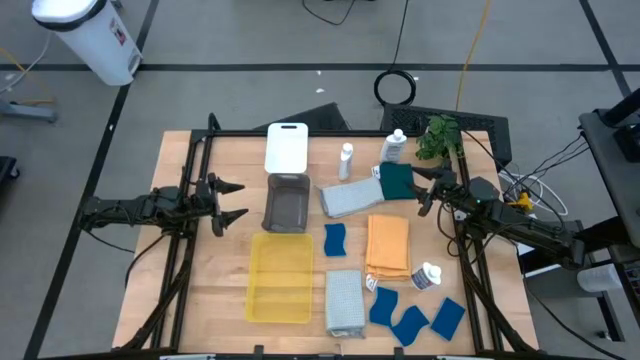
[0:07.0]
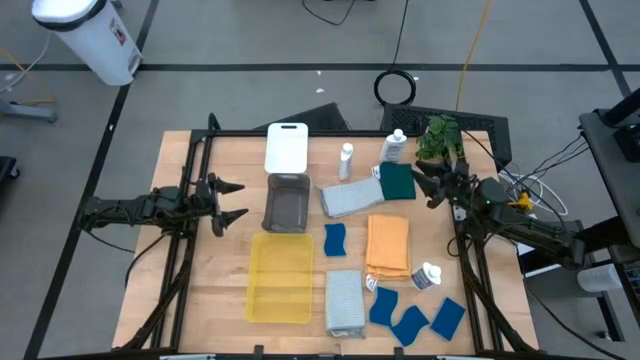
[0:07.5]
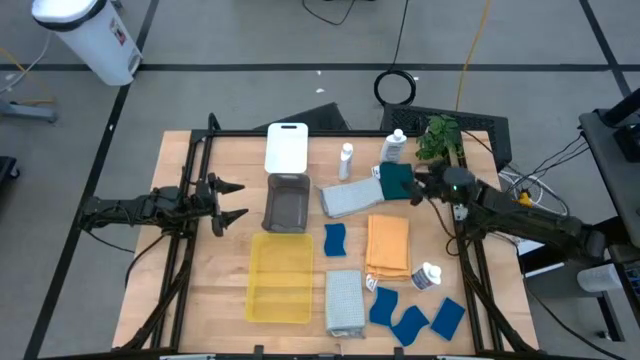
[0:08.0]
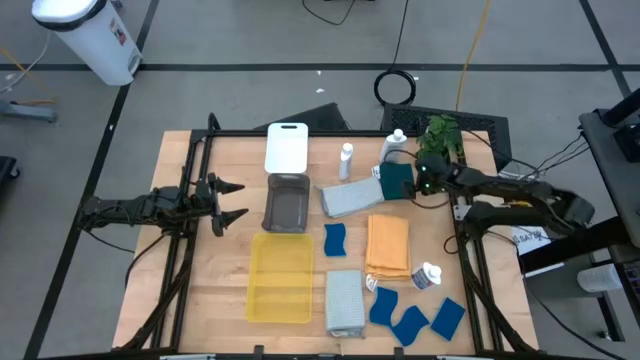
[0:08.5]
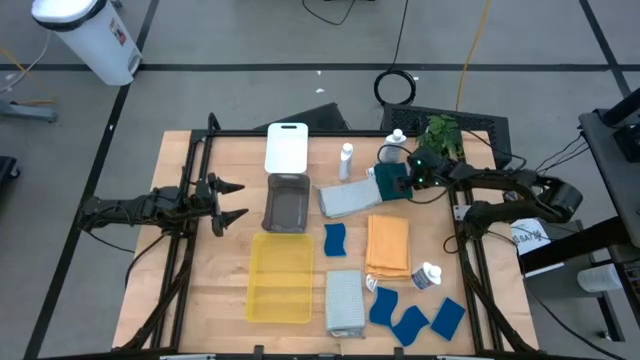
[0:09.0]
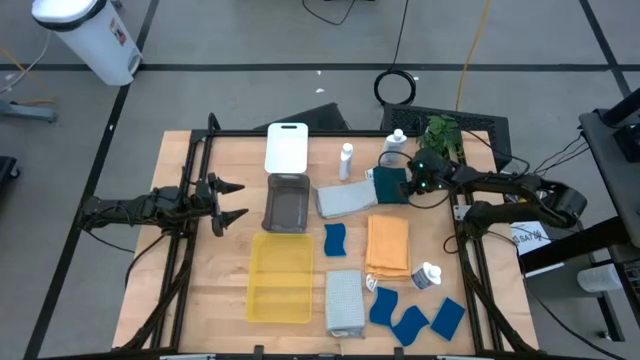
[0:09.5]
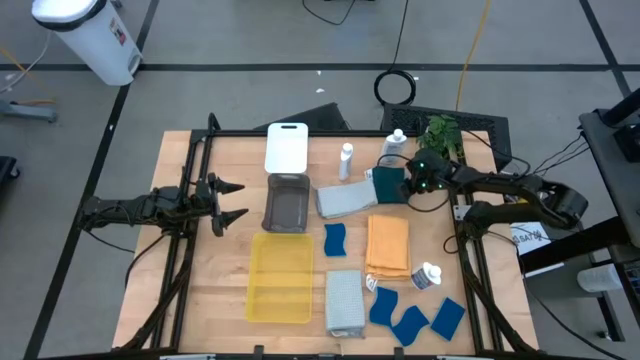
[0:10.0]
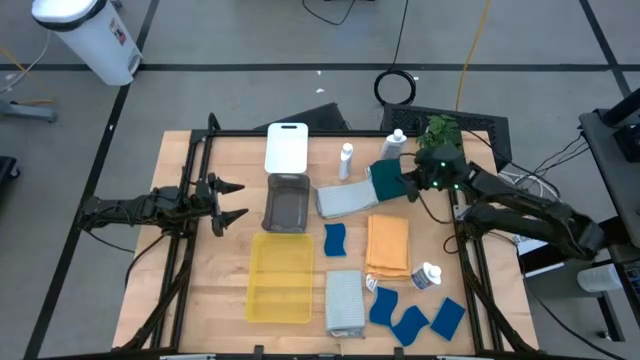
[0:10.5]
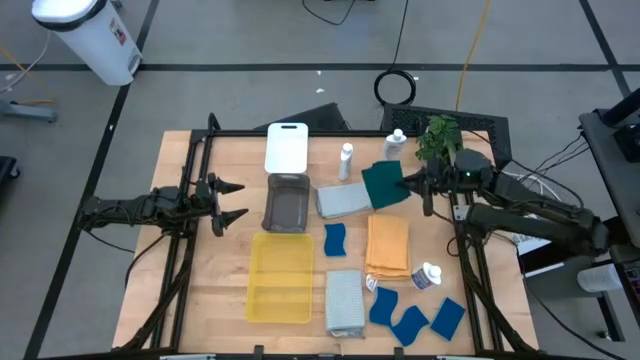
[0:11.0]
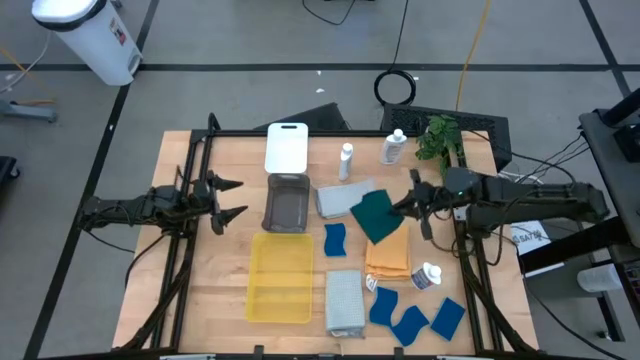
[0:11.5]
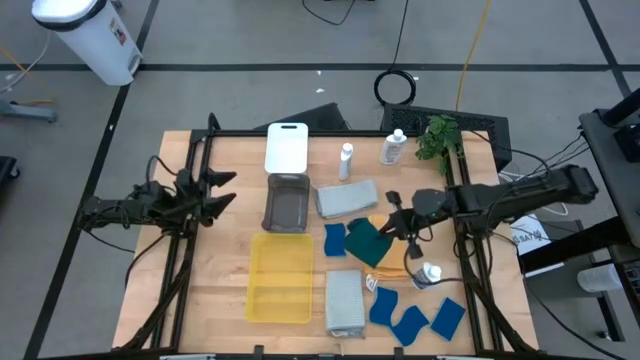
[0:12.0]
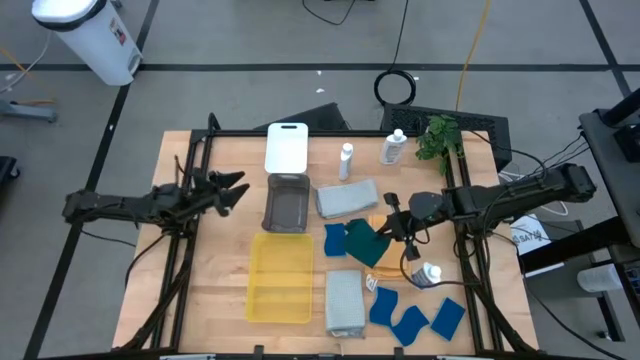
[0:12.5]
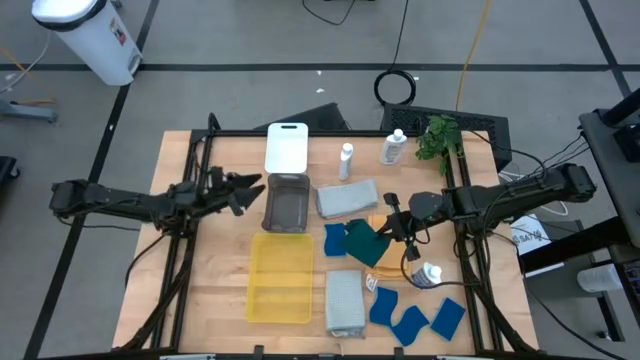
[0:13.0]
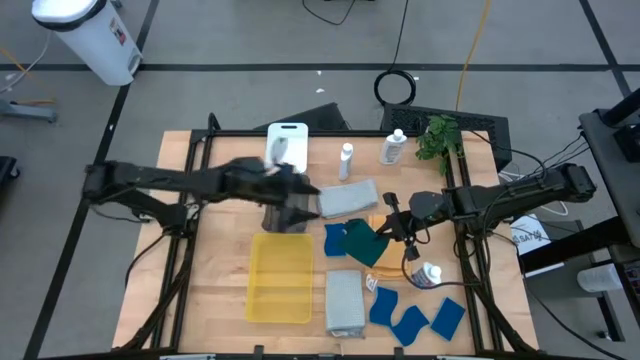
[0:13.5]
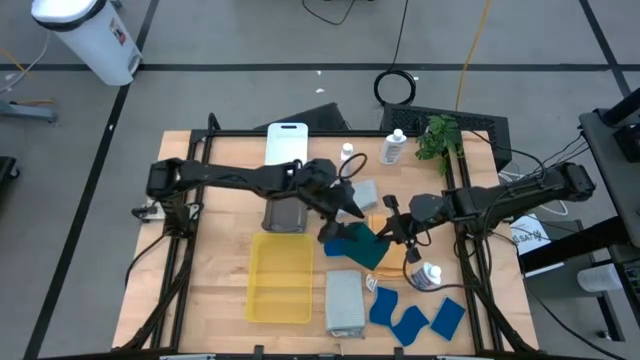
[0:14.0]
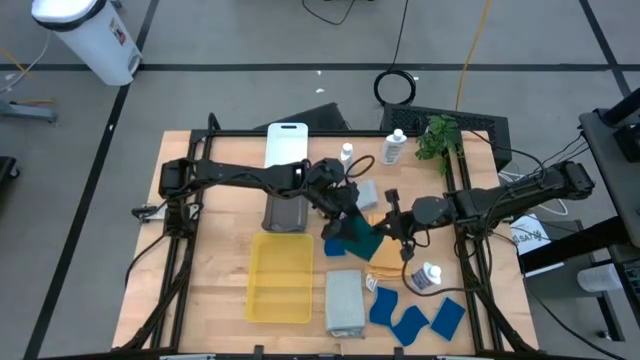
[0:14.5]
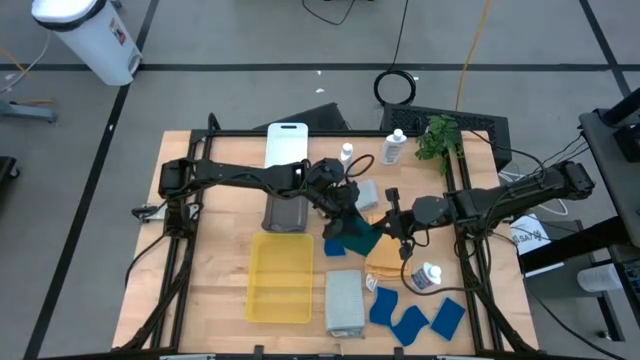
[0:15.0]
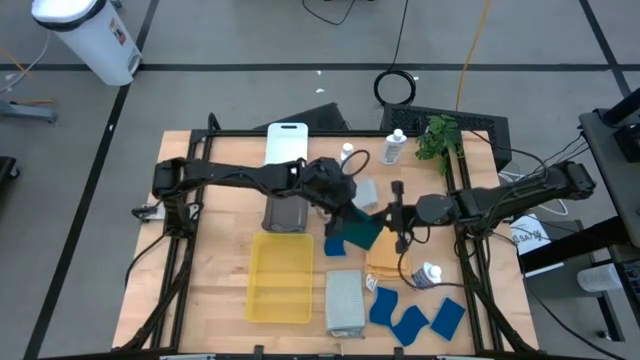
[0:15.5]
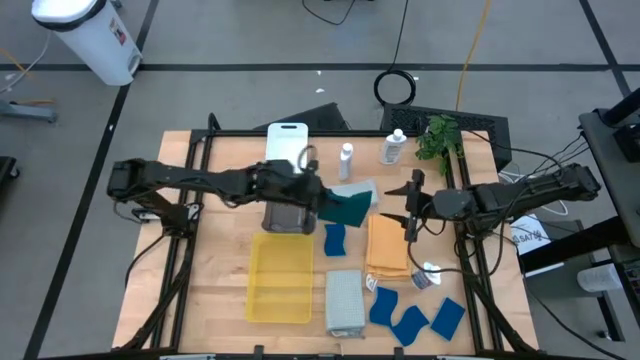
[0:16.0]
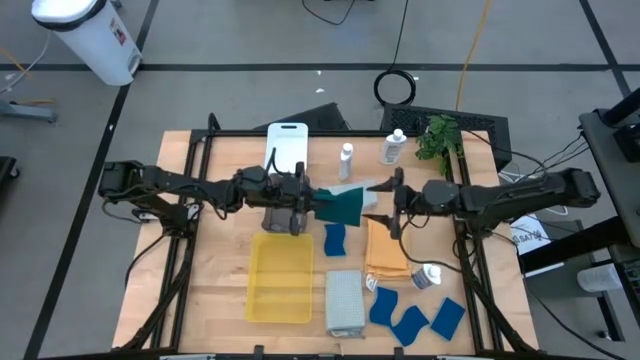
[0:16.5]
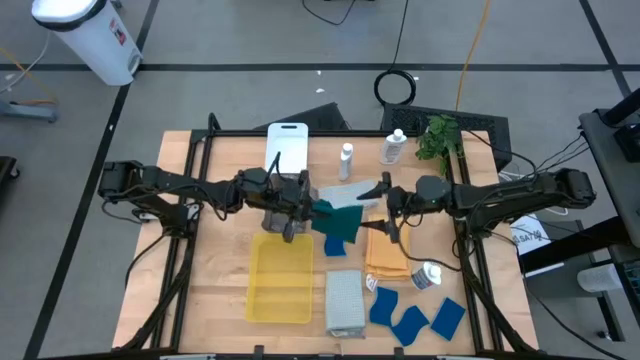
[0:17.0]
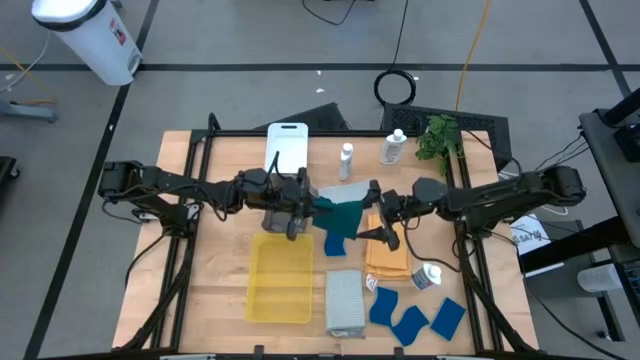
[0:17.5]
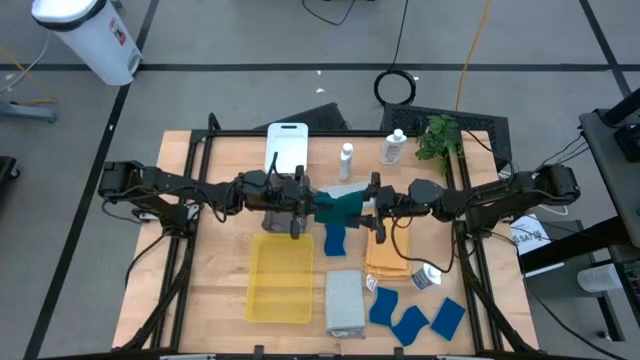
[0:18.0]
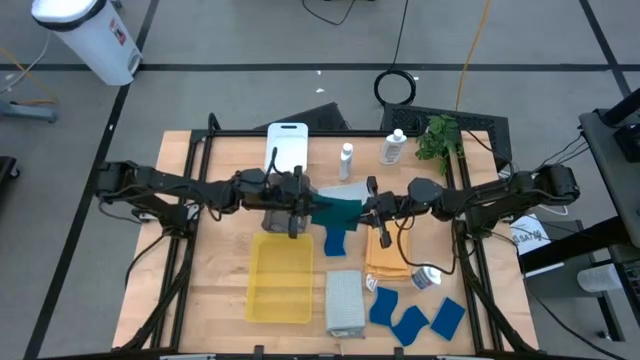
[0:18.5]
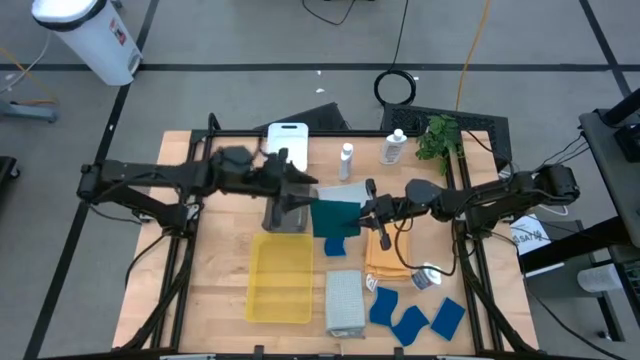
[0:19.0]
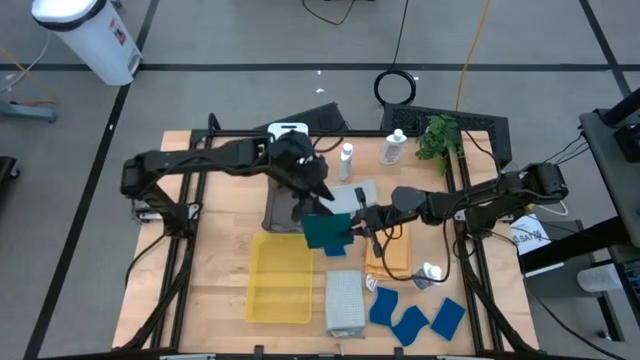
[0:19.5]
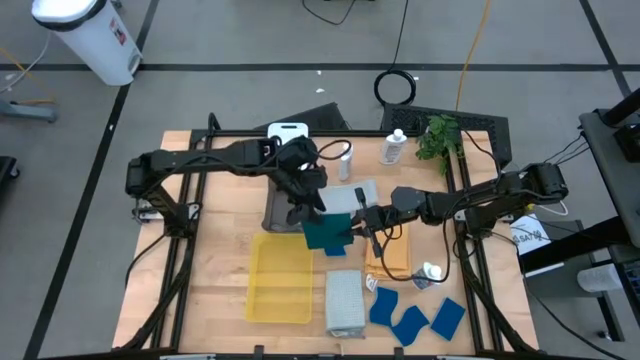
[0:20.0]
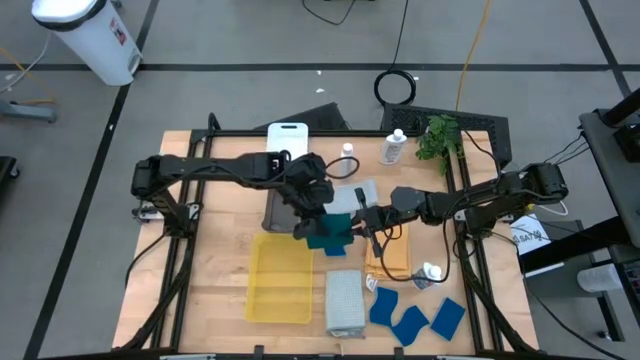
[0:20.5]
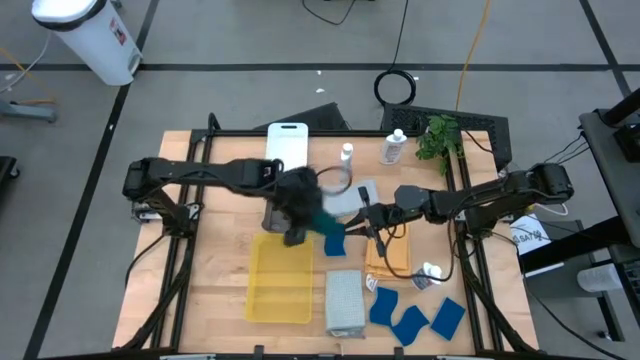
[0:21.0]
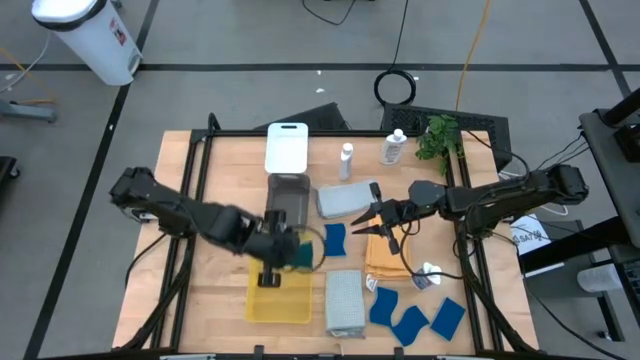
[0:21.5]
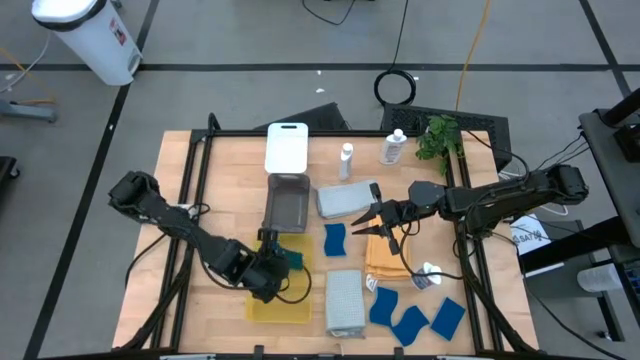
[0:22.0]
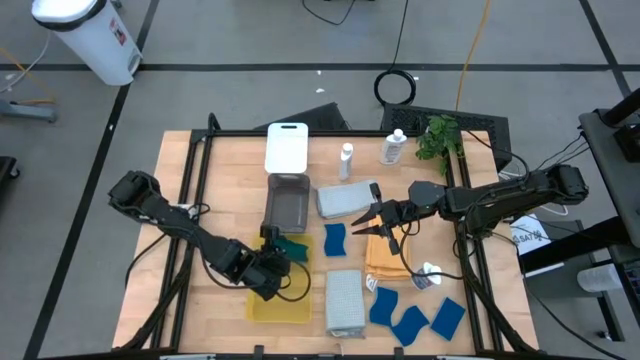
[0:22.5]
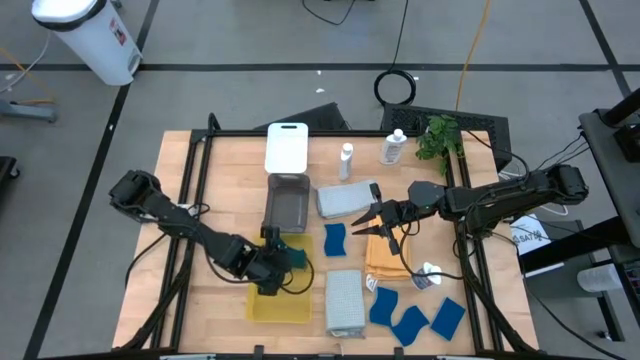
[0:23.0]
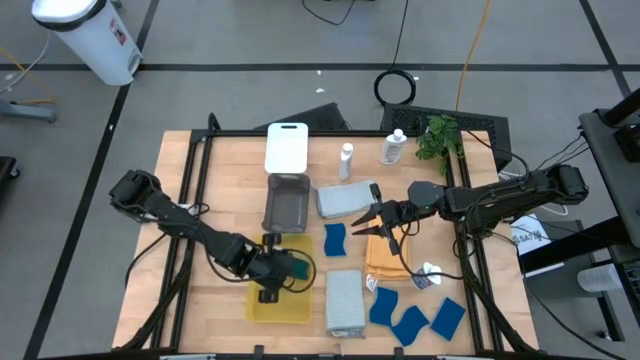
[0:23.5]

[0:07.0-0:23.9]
Task: Pick & Place Kitchen Items
Put the green towel into the yellow bin

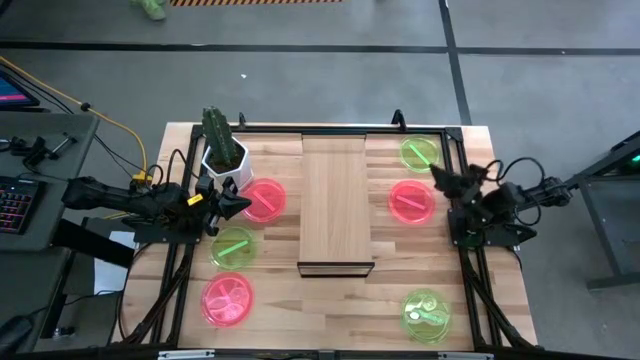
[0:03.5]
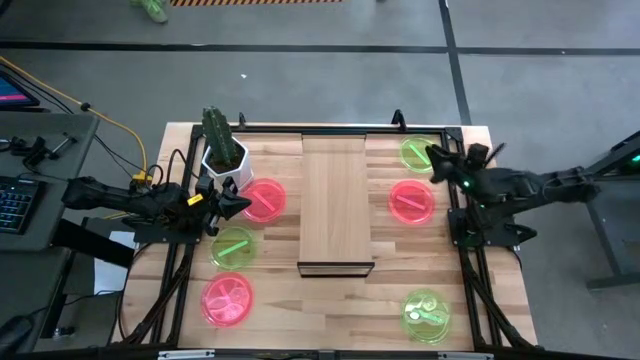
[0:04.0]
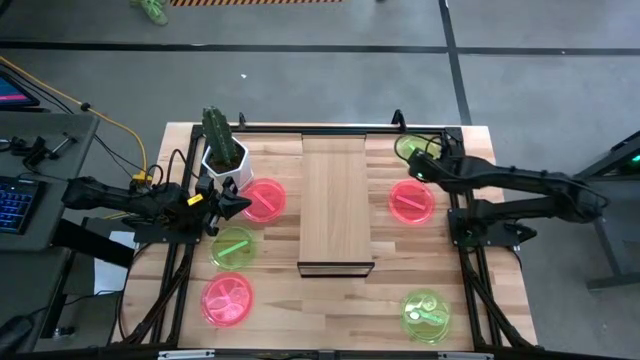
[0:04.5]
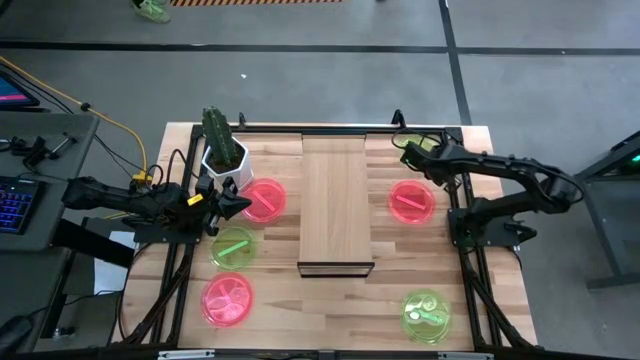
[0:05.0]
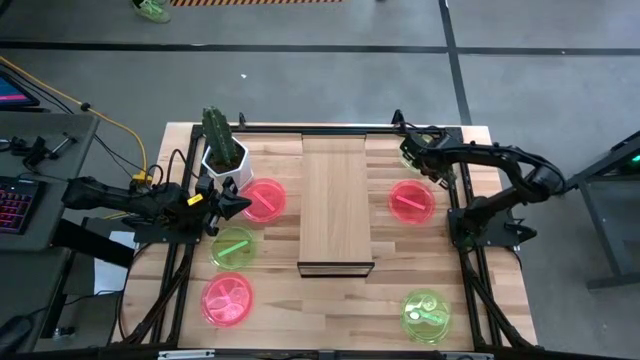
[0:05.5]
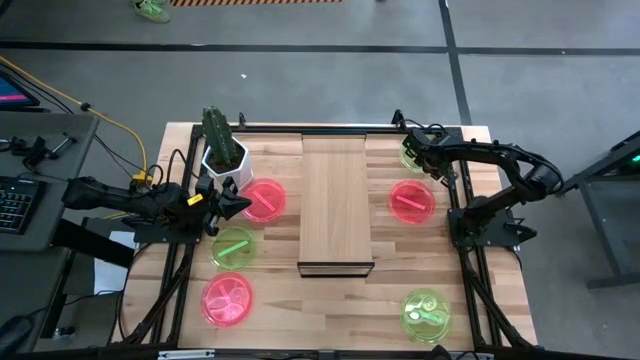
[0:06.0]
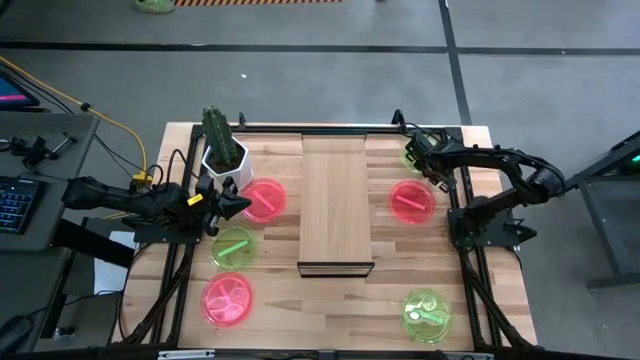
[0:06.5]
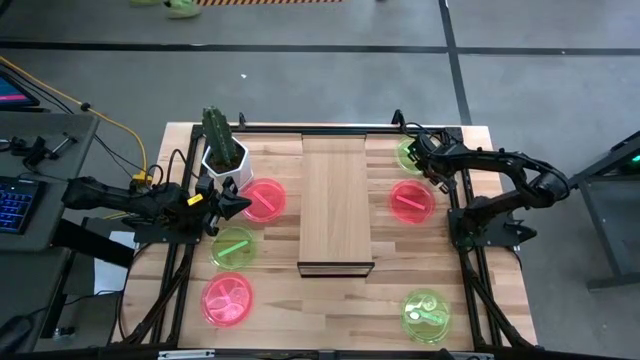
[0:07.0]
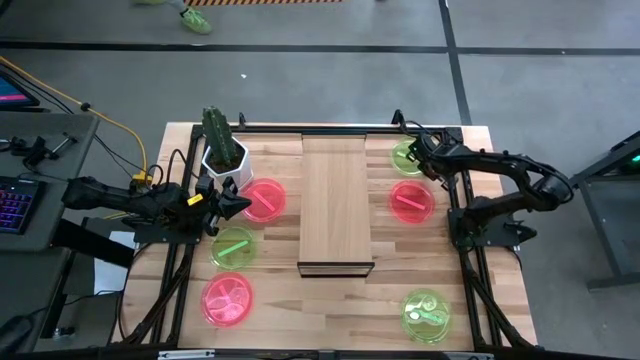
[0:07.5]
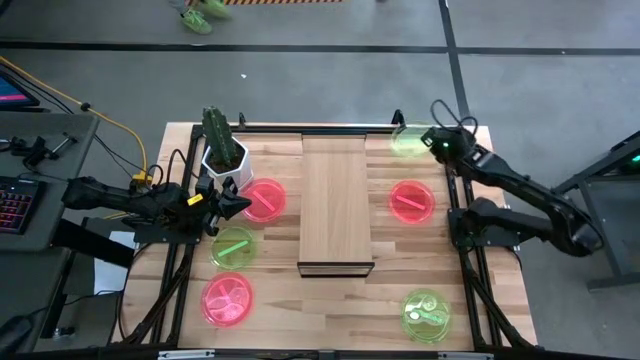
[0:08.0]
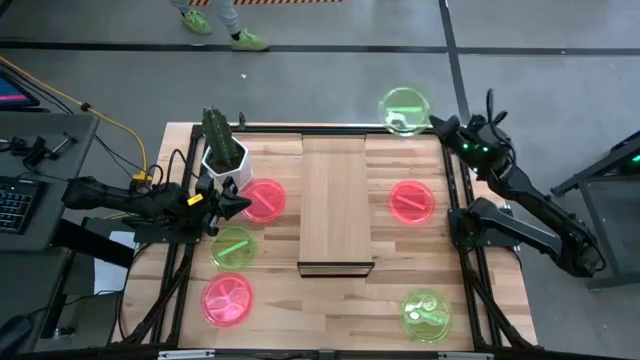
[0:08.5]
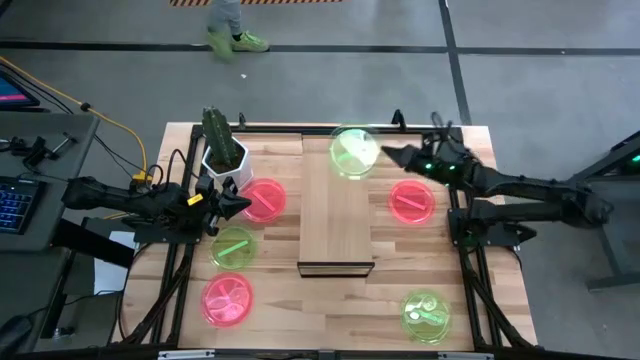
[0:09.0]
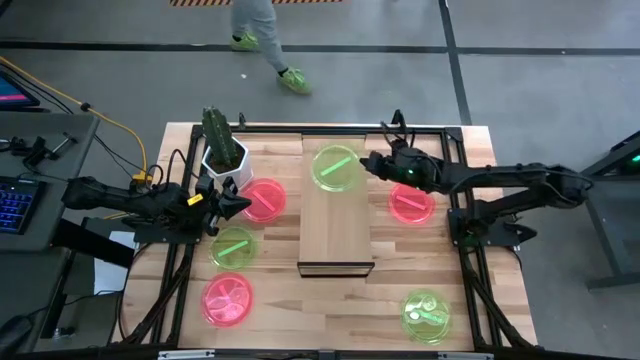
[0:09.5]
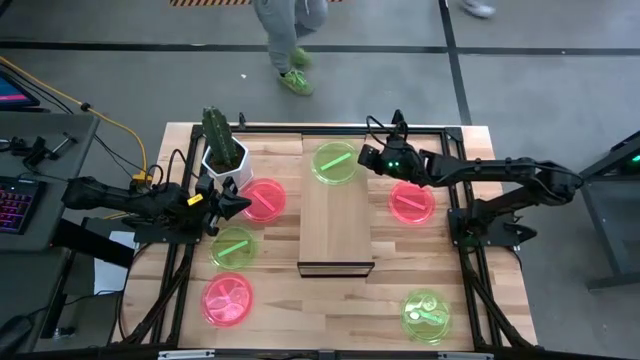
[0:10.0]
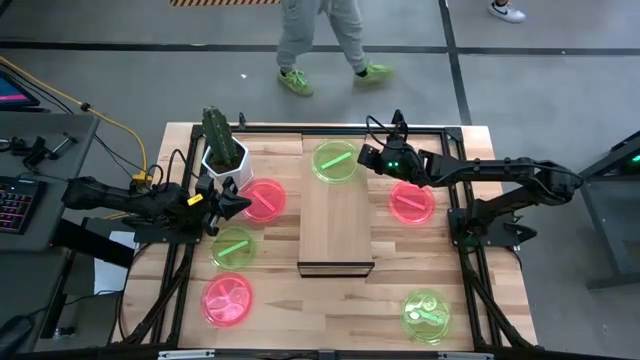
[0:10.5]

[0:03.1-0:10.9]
Task: Place and stack plates onto a shelf
Put the top right green plate on the shelf
